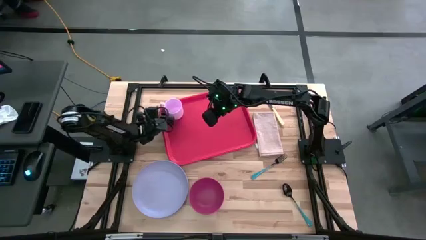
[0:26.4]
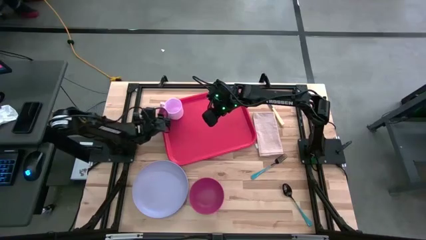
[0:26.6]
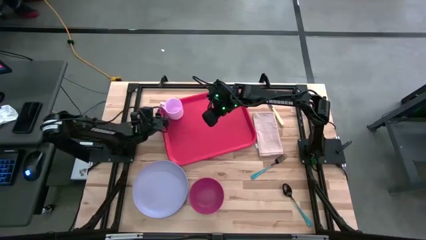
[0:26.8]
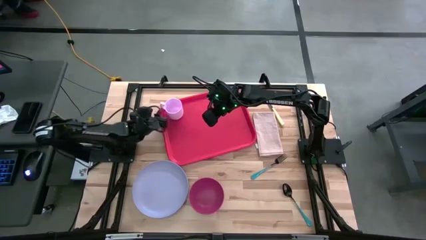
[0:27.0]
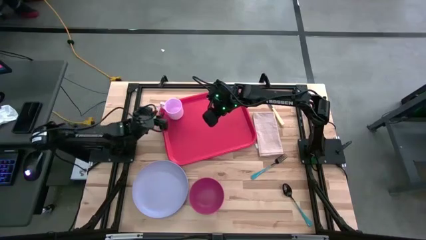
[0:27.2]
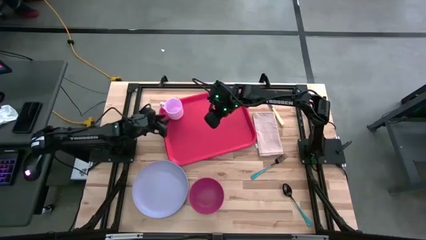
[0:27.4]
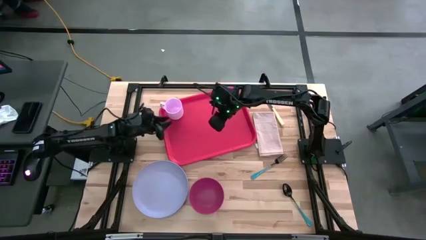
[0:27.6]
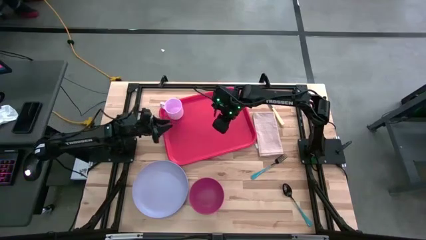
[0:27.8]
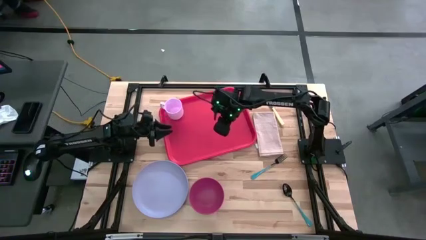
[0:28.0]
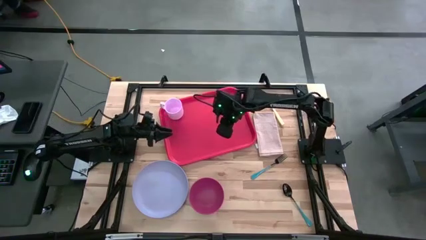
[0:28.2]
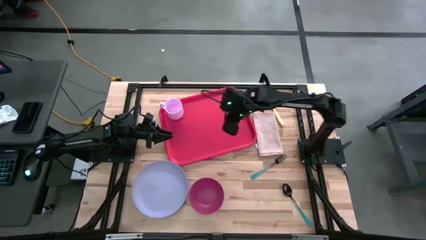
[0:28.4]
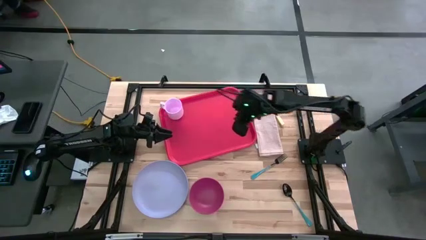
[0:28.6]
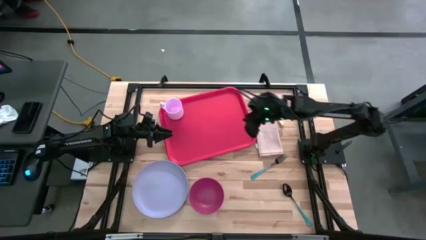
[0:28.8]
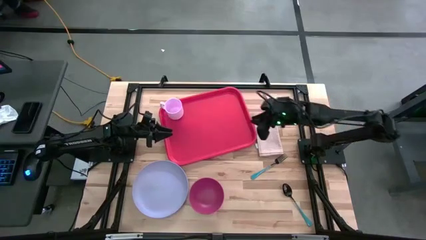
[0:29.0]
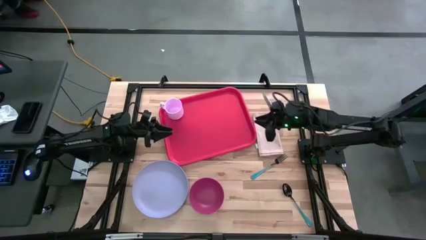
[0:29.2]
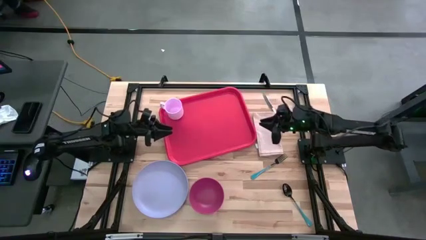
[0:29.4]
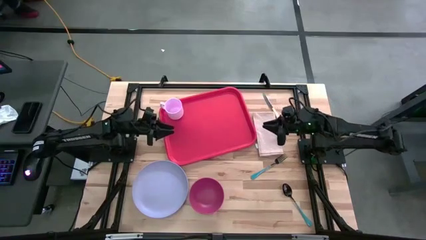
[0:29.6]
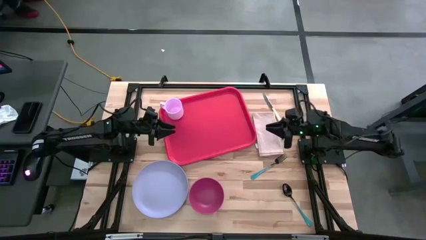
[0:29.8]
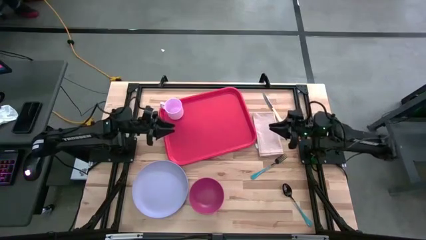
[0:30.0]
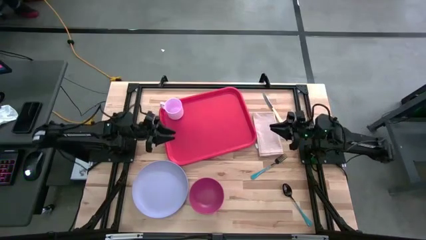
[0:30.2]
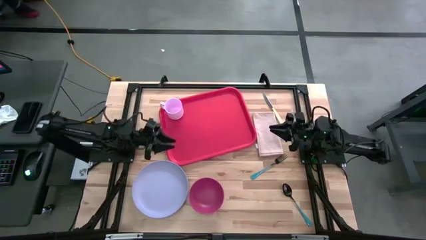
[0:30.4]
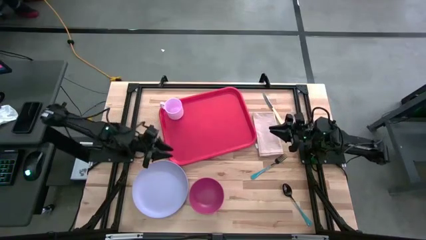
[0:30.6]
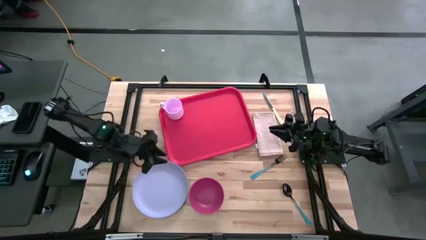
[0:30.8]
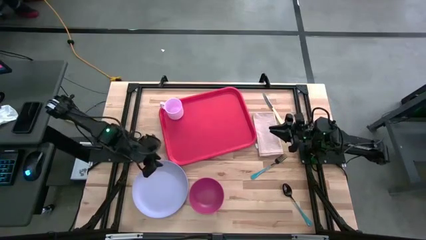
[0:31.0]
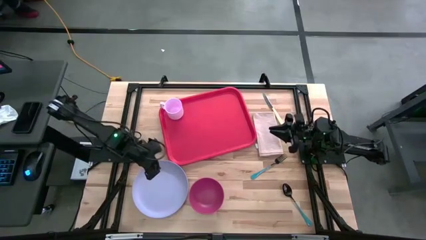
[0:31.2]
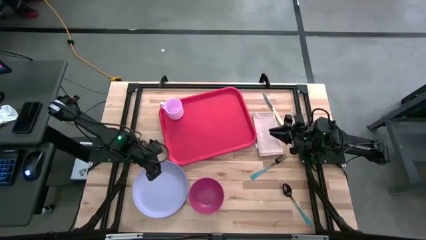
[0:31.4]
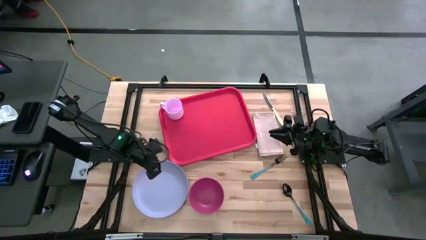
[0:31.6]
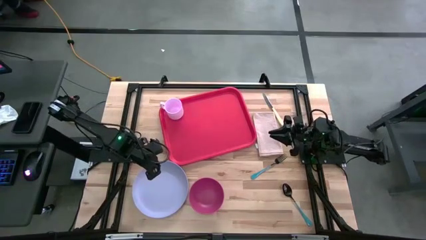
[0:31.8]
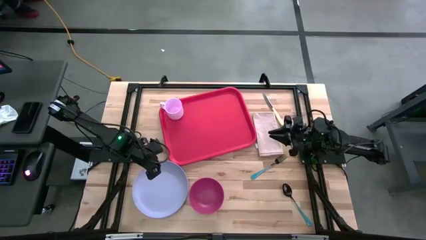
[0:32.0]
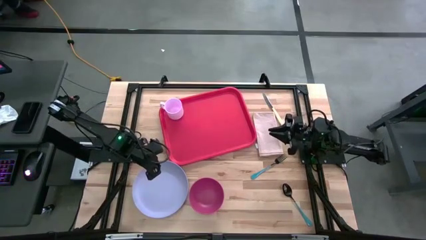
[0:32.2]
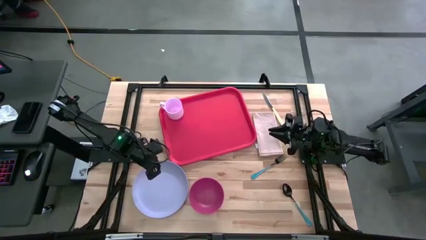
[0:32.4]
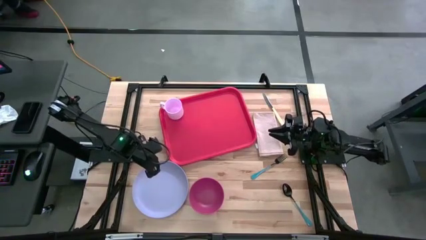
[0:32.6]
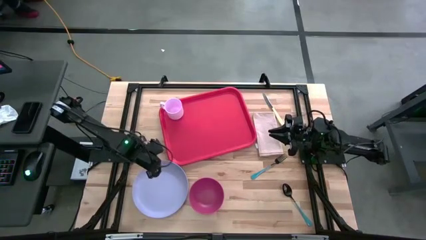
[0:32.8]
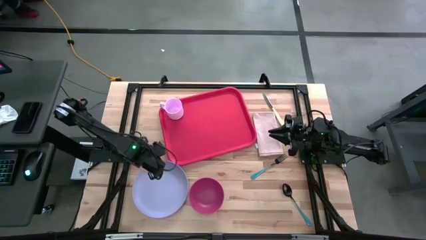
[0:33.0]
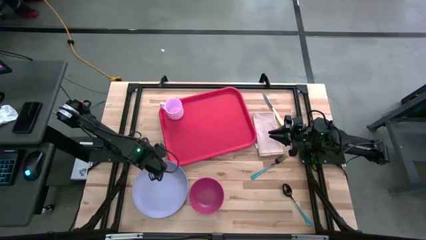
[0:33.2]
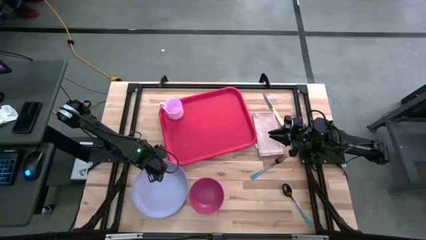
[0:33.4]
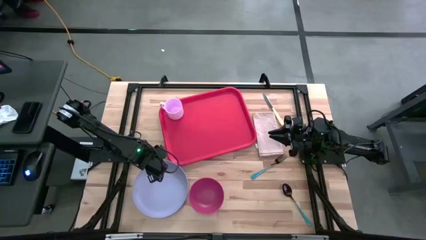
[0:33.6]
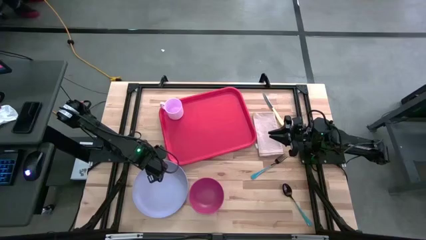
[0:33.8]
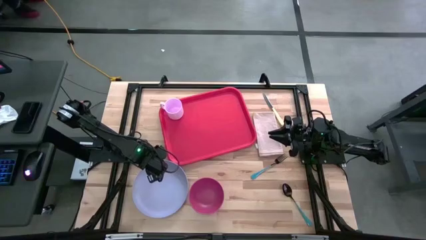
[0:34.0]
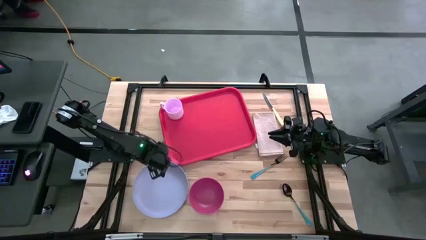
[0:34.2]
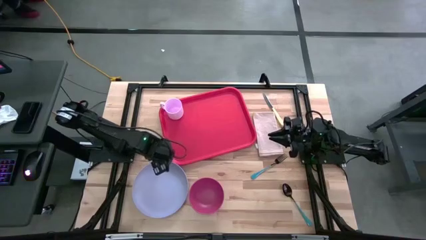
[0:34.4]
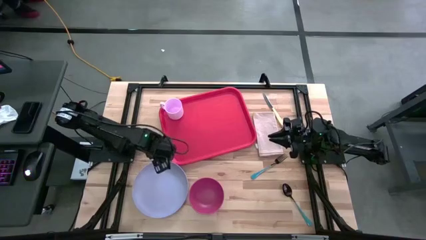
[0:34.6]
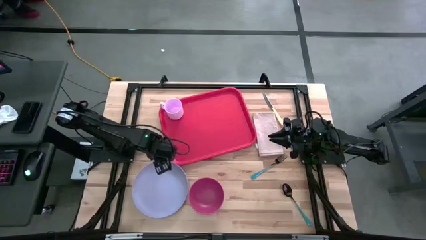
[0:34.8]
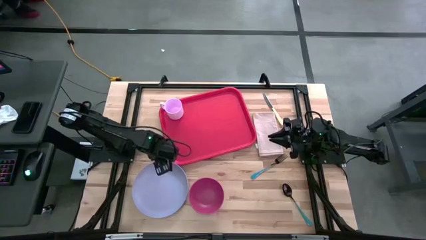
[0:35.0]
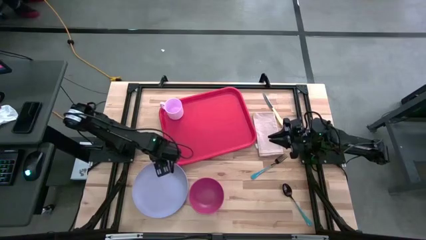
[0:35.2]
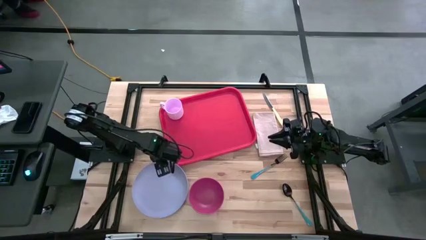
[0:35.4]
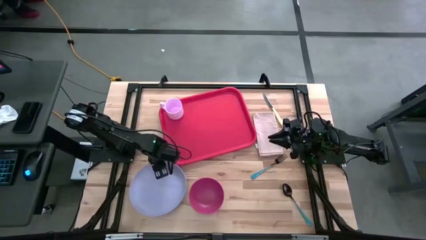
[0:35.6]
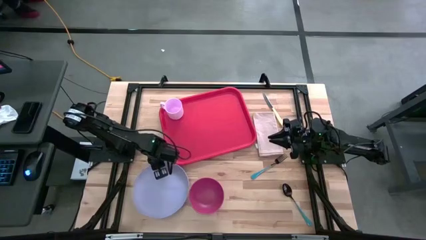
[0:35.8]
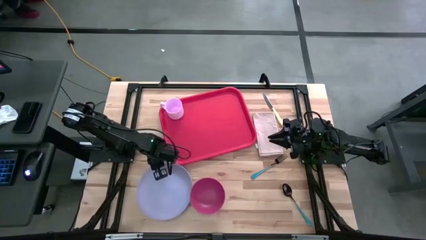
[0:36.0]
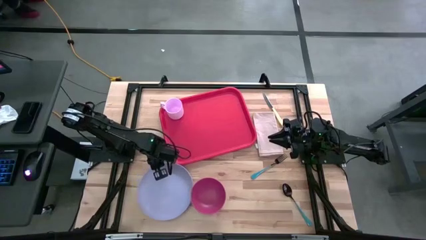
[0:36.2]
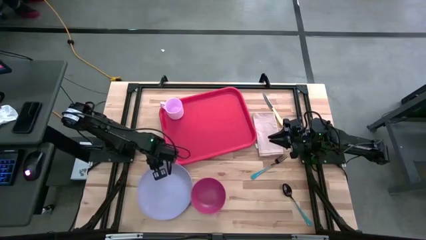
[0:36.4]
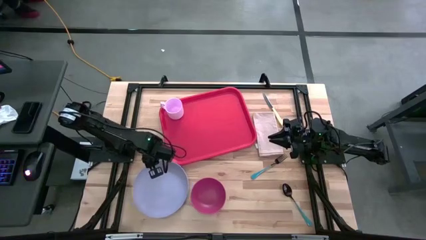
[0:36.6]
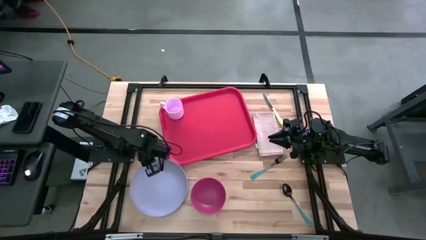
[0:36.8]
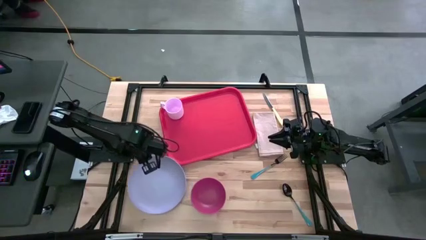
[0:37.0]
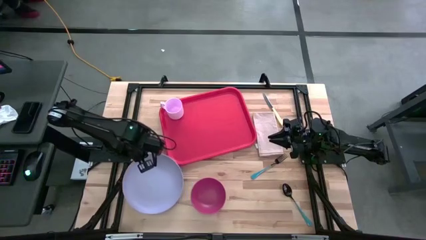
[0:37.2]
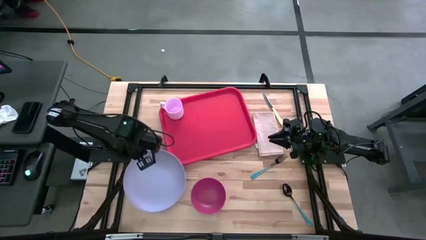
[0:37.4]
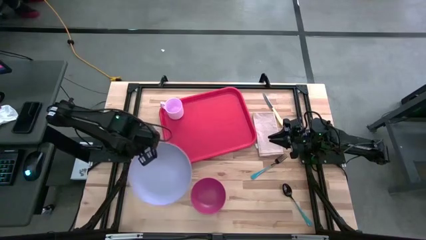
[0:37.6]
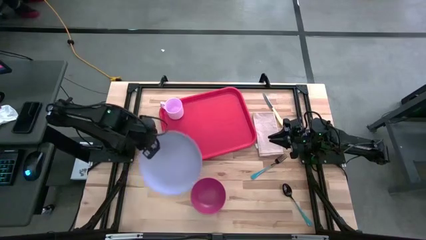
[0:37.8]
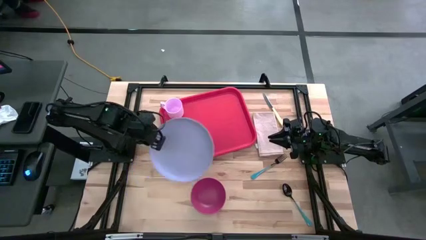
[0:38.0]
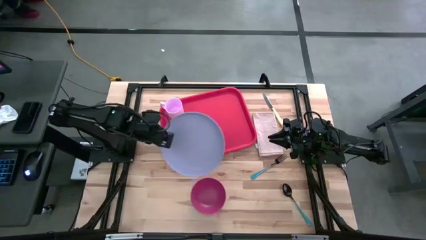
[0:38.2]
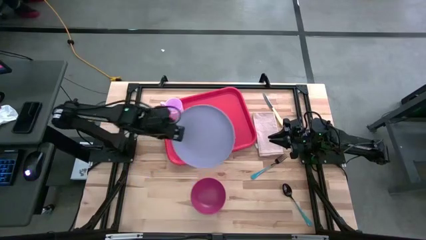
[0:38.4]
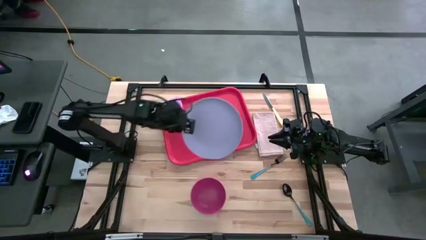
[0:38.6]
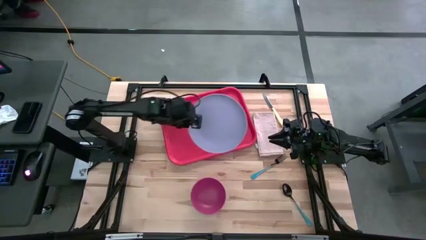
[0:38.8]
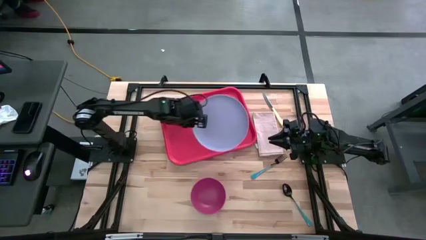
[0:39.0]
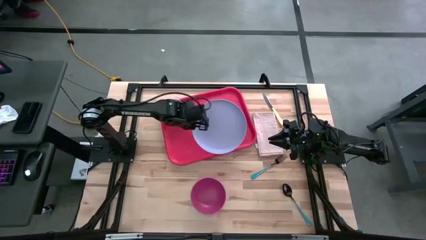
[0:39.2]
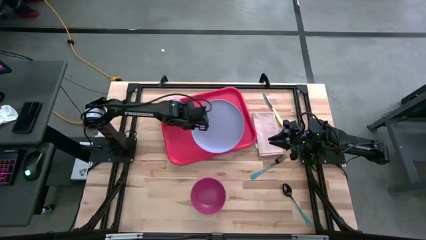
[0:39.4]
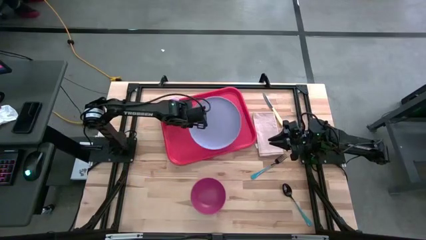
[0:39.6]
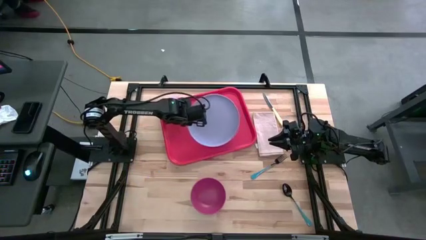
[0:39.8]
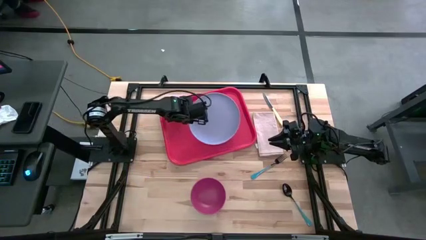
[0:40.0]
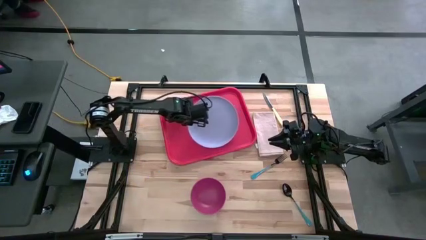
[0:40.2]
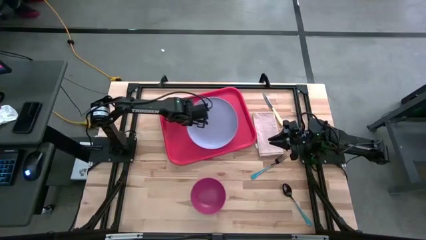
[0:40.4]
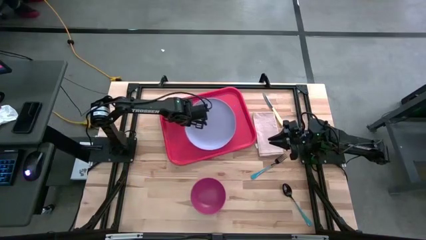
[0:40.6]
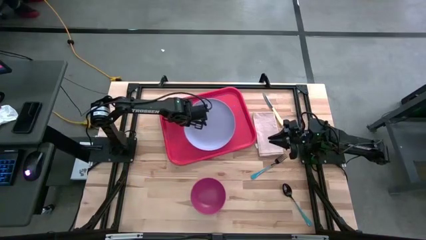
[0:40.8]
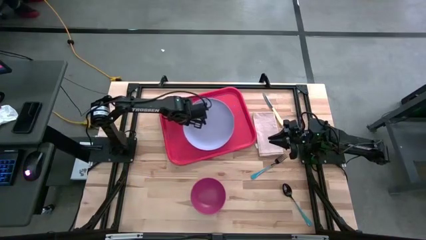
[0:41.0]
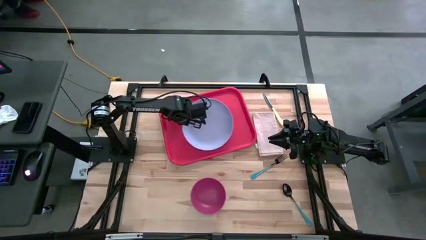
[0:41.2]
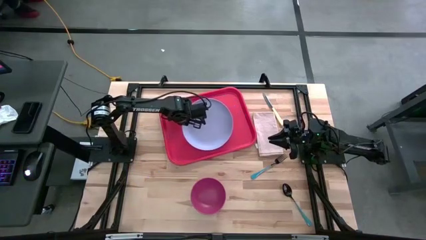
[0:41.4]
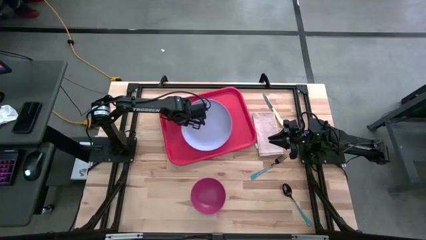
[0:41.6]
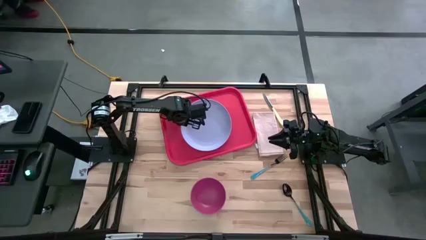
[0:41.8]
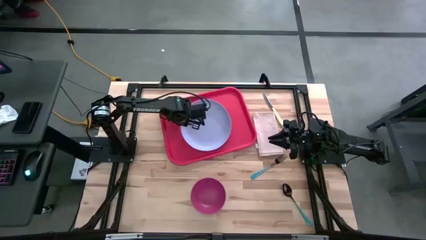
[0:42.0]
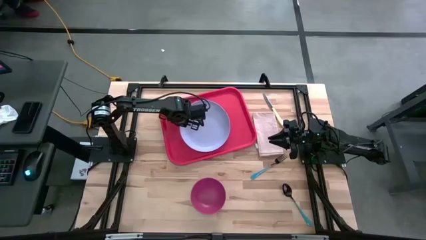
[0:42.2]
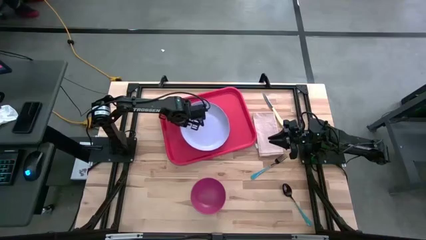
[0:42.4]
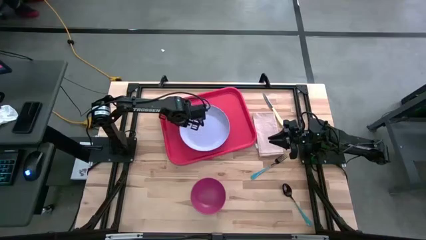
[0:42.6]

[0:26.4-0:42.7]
Task: Set up tray
Put the purple plate on the red tray below the light pink mug
